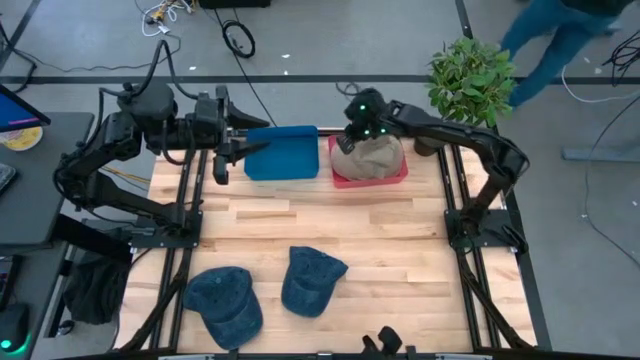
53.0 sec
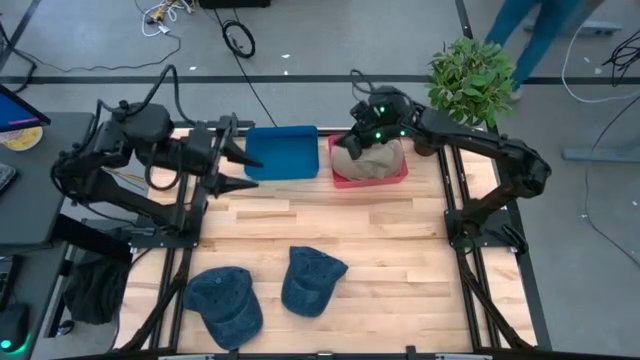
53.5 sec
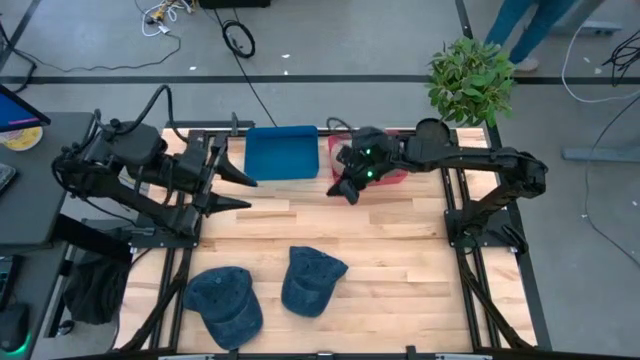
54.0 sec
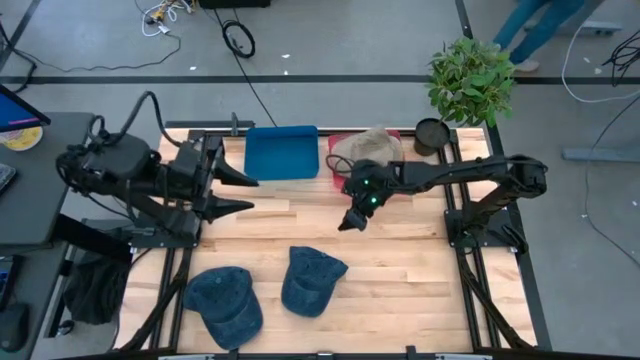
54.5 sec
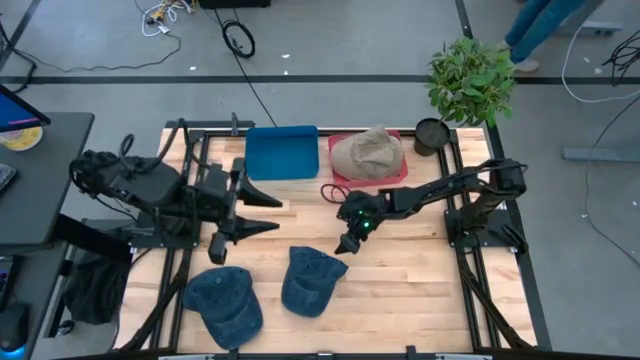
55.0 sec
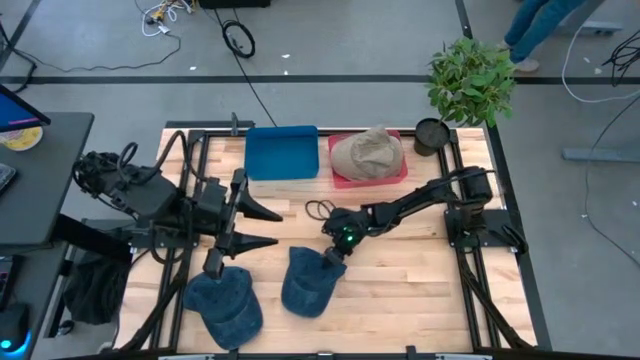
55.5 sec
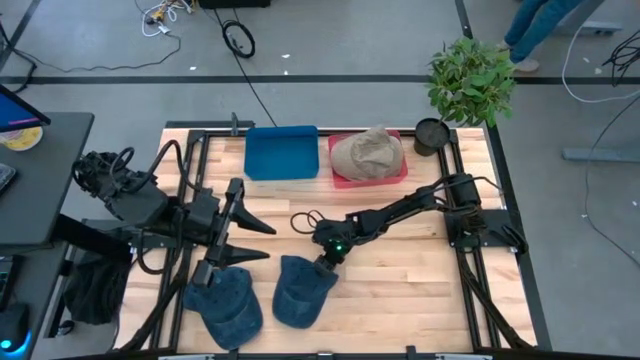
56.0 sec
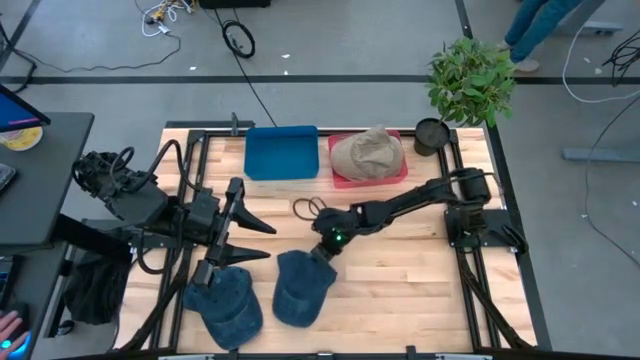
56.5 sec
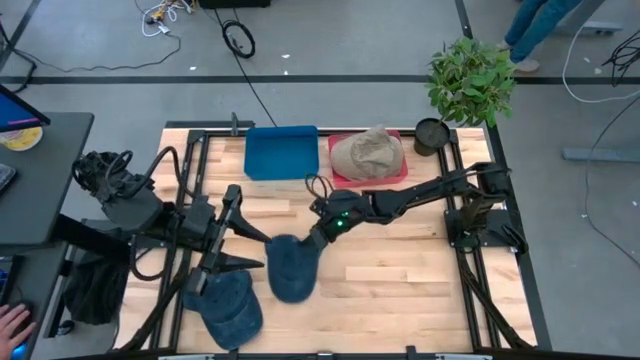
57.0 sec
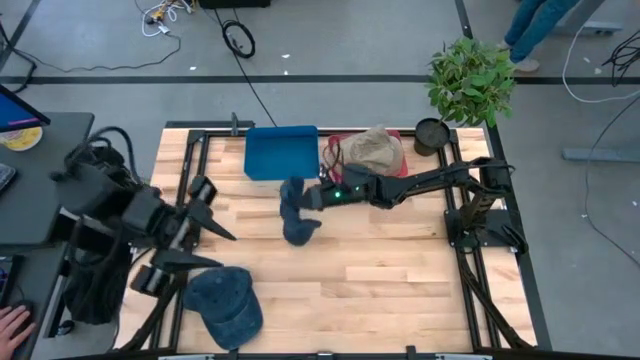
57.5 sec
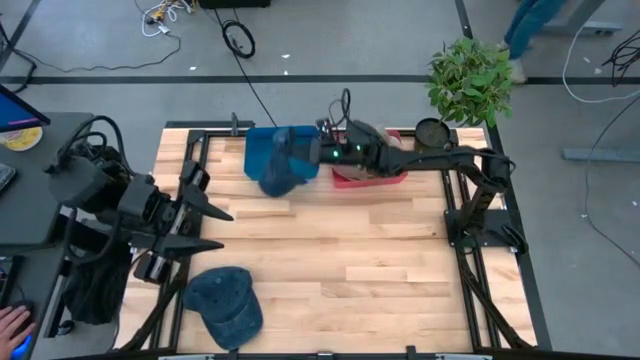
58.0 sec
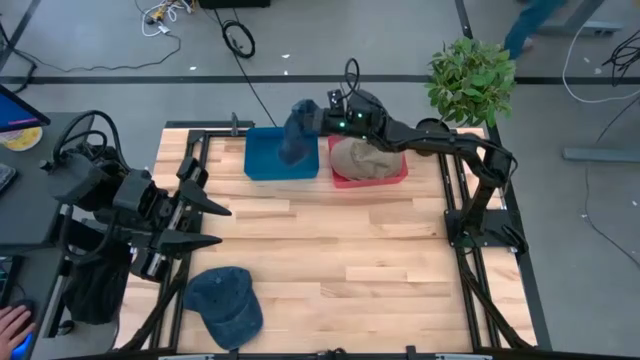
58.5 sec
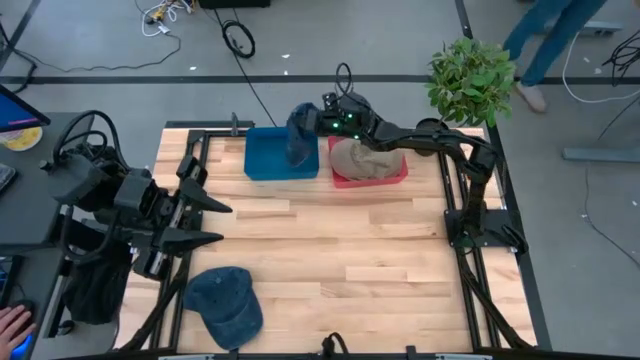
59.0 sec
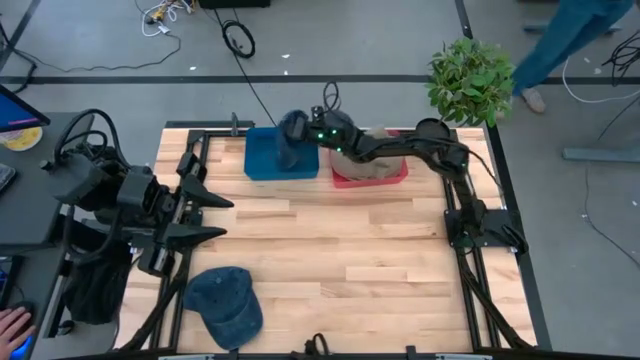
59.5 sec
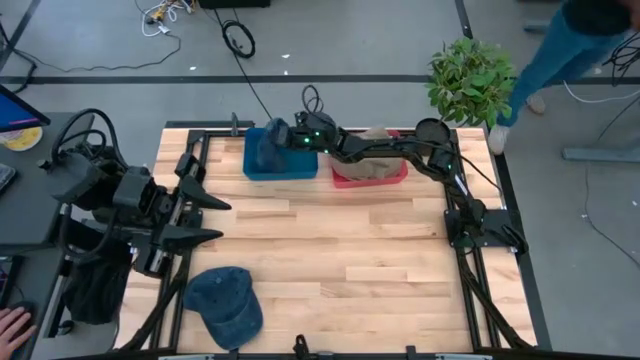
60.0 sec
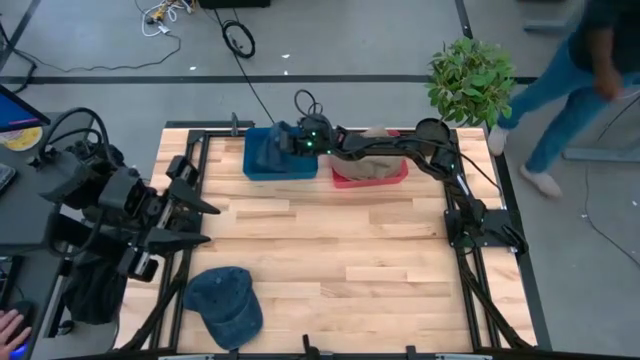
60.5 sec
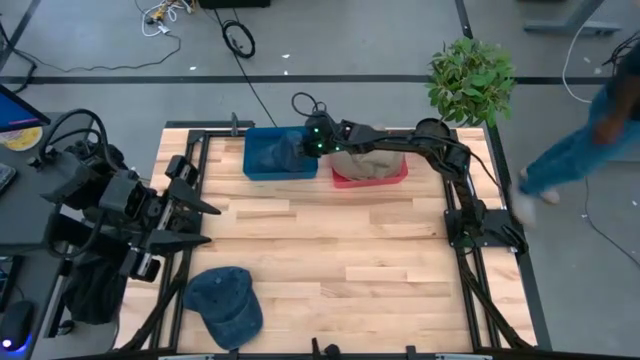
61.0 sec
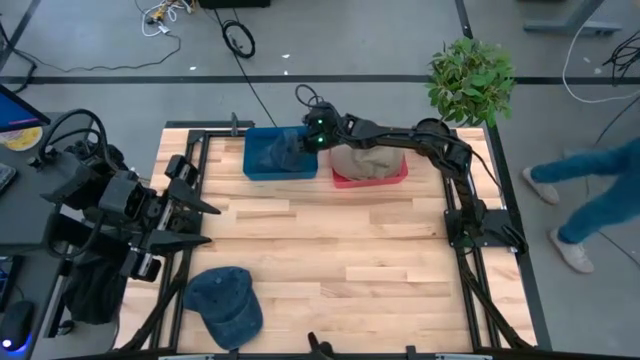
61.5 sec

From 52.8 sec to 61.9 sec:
Task: Pick & Place hat
Put the right blue cap into the blue bin
